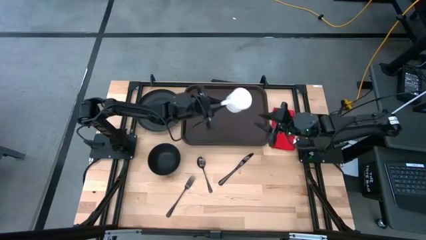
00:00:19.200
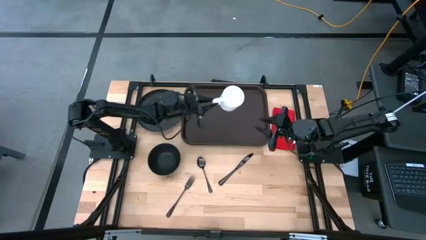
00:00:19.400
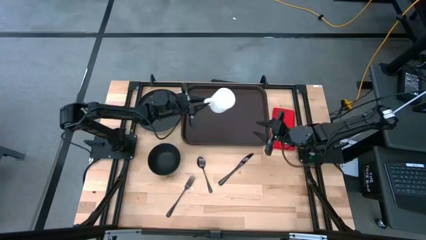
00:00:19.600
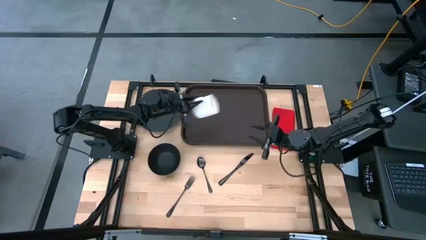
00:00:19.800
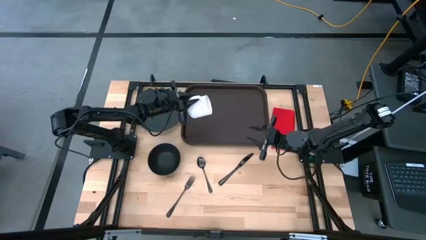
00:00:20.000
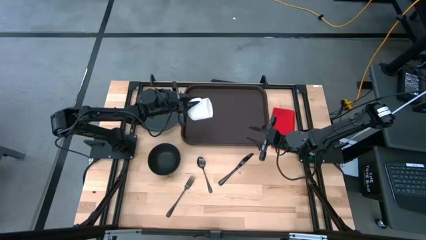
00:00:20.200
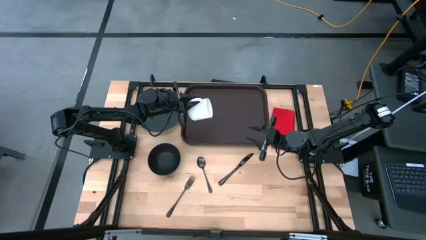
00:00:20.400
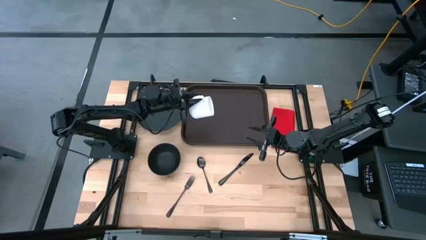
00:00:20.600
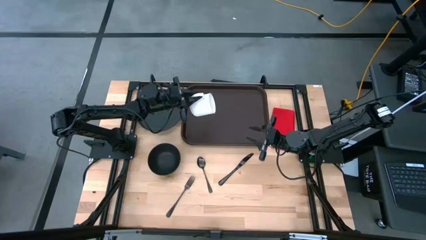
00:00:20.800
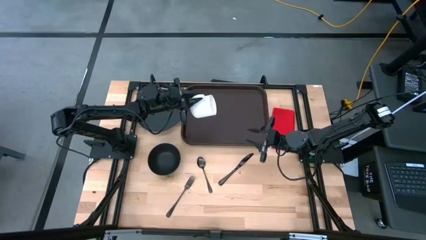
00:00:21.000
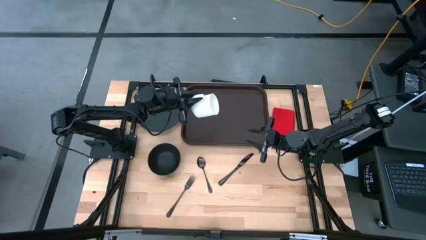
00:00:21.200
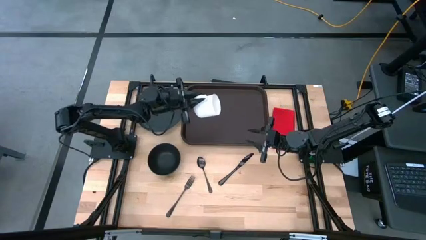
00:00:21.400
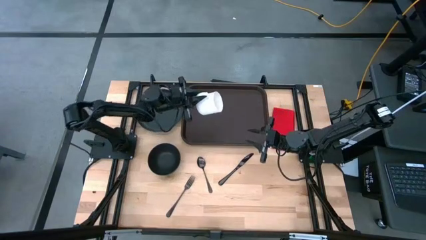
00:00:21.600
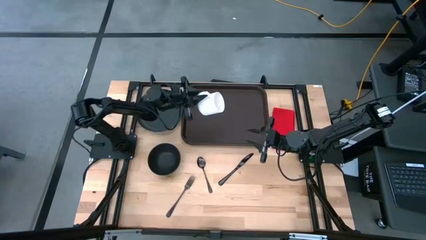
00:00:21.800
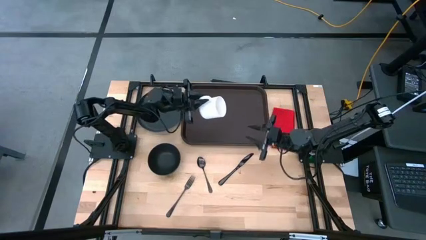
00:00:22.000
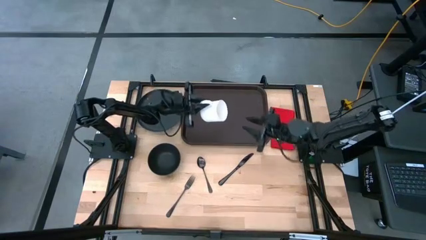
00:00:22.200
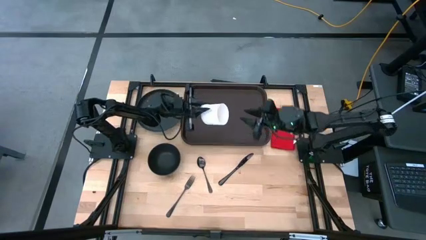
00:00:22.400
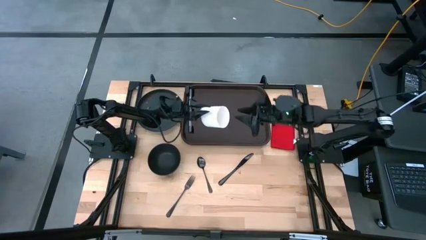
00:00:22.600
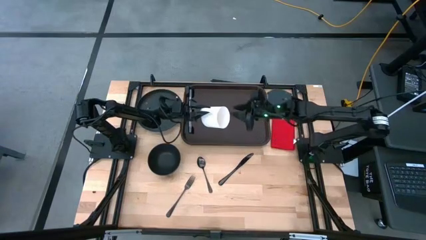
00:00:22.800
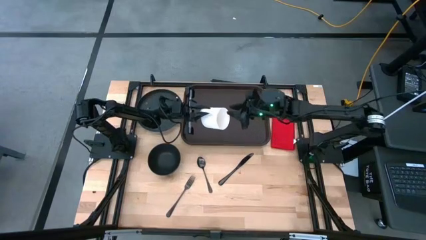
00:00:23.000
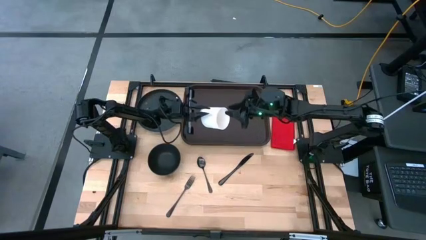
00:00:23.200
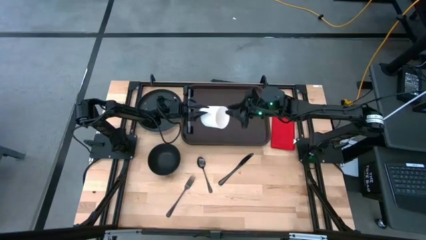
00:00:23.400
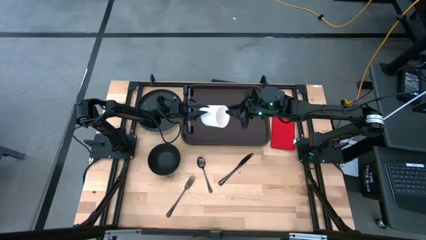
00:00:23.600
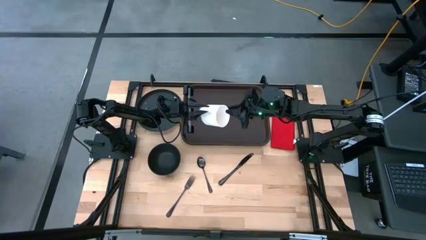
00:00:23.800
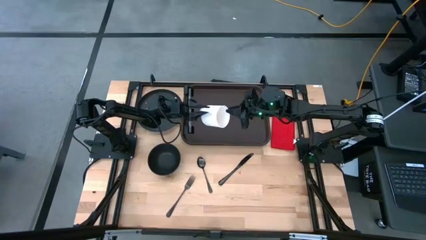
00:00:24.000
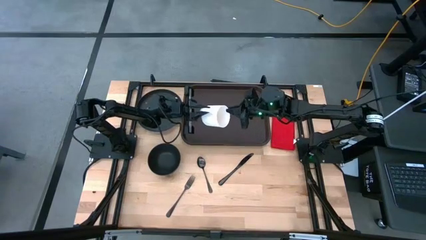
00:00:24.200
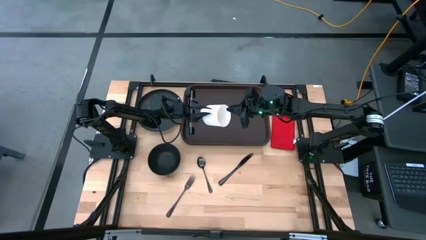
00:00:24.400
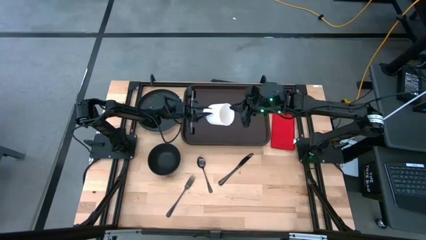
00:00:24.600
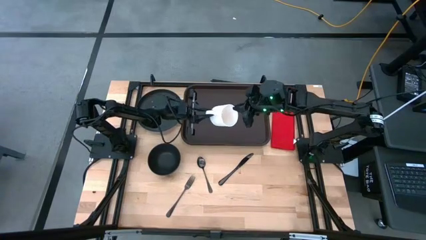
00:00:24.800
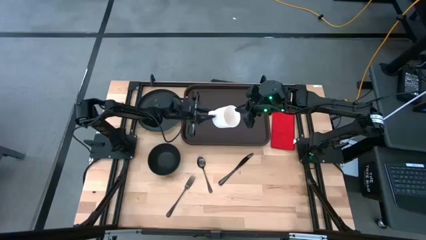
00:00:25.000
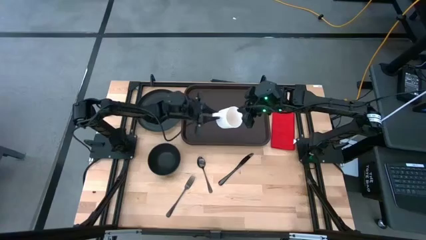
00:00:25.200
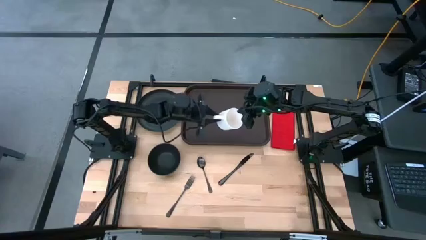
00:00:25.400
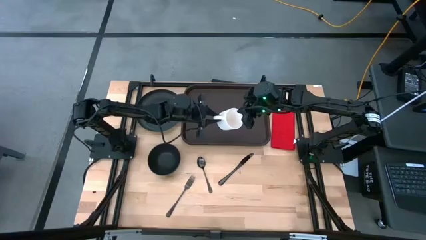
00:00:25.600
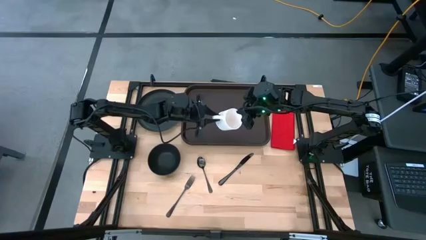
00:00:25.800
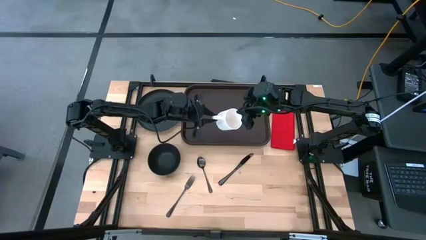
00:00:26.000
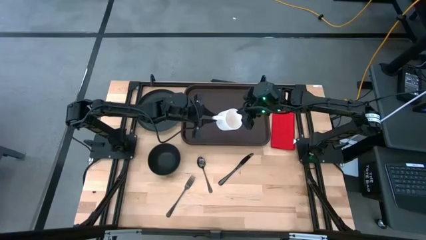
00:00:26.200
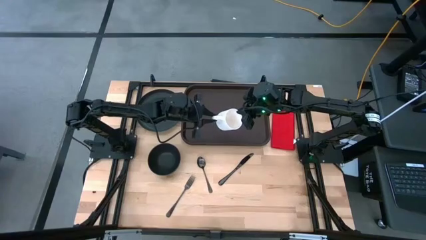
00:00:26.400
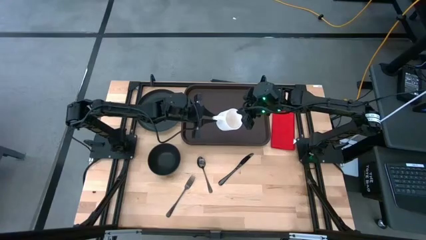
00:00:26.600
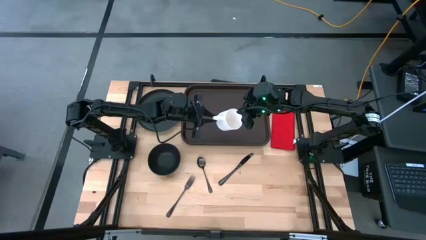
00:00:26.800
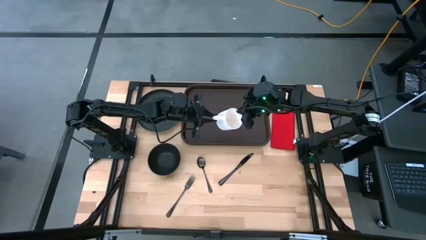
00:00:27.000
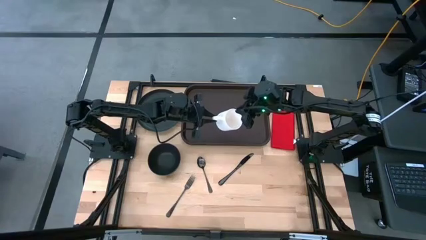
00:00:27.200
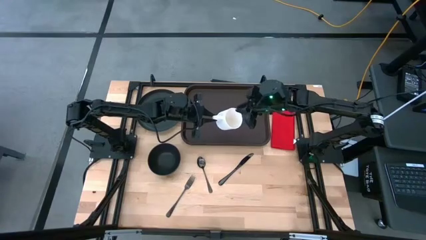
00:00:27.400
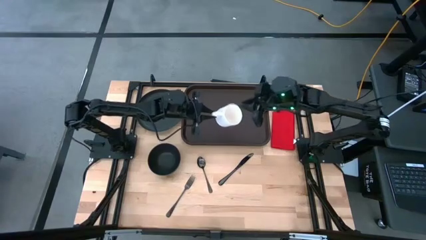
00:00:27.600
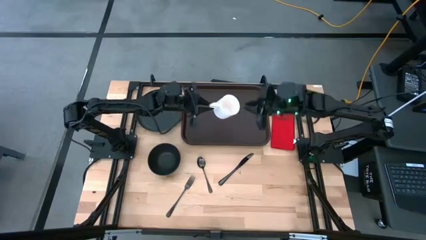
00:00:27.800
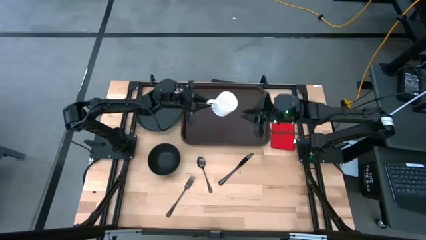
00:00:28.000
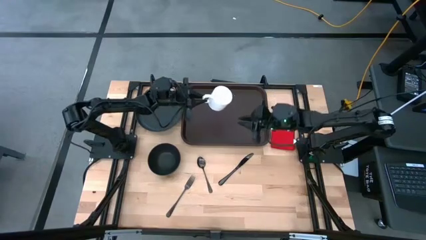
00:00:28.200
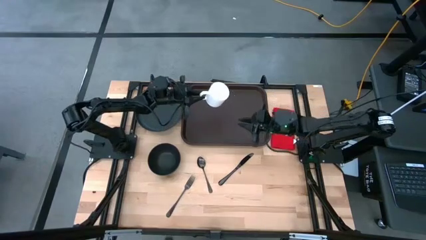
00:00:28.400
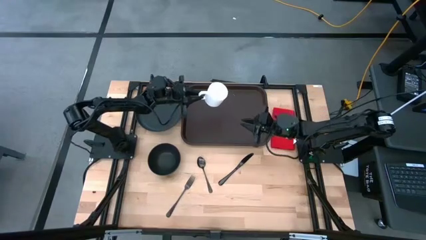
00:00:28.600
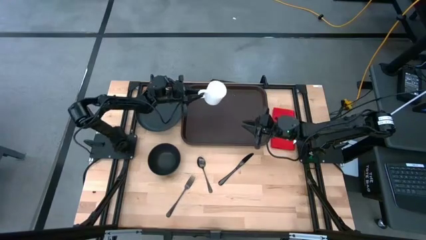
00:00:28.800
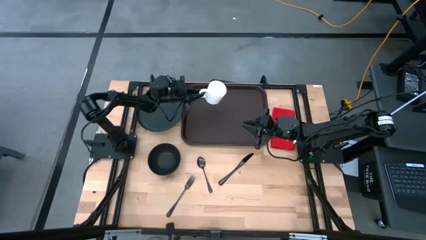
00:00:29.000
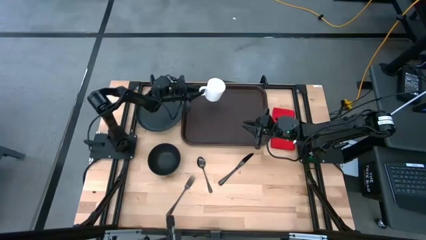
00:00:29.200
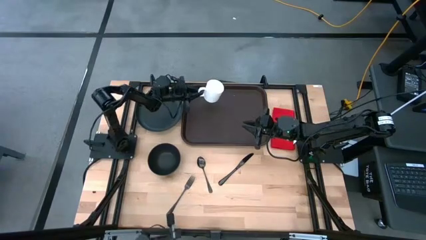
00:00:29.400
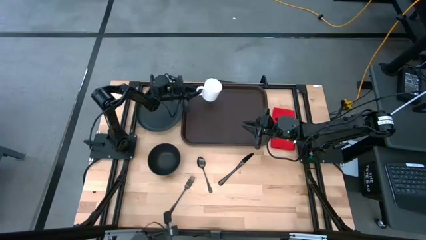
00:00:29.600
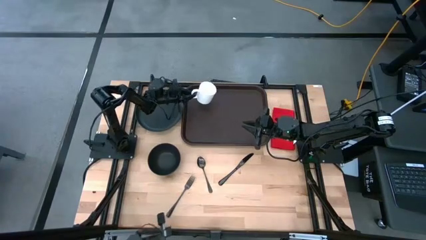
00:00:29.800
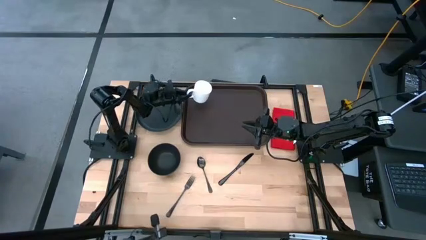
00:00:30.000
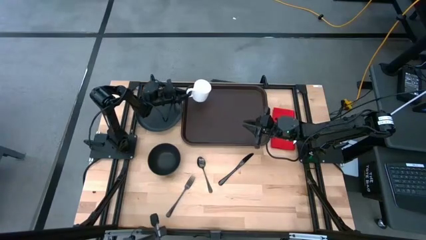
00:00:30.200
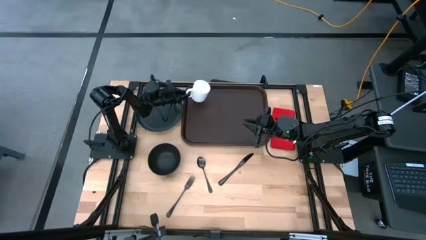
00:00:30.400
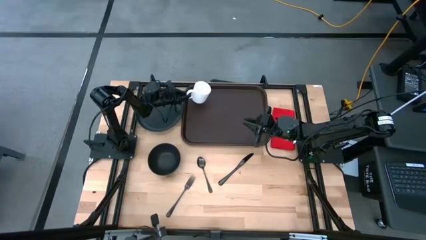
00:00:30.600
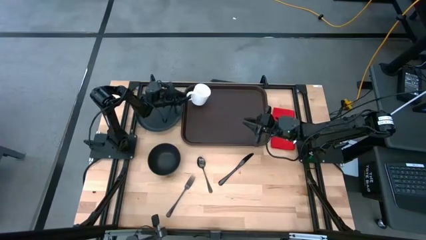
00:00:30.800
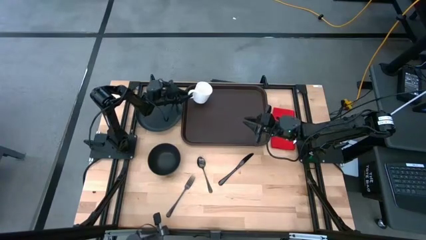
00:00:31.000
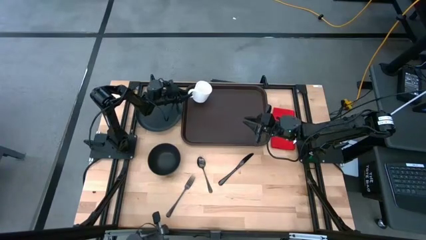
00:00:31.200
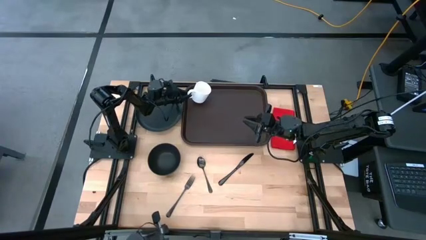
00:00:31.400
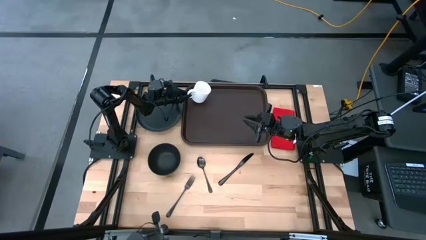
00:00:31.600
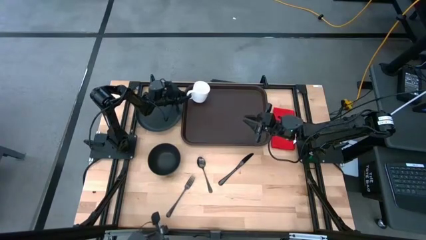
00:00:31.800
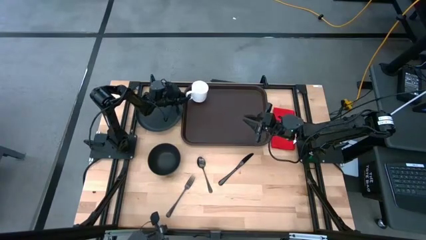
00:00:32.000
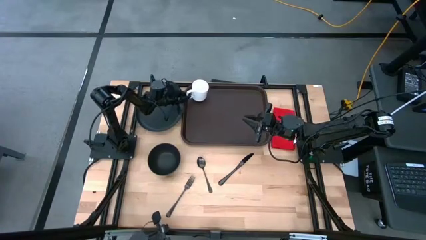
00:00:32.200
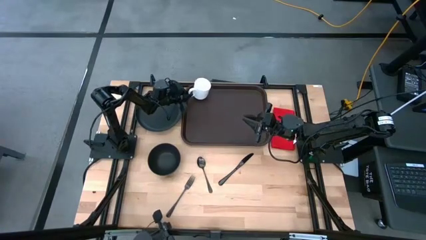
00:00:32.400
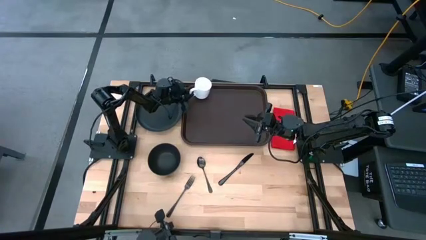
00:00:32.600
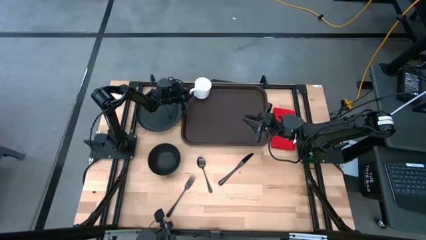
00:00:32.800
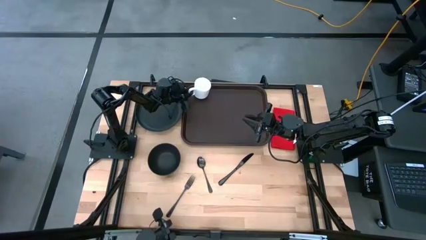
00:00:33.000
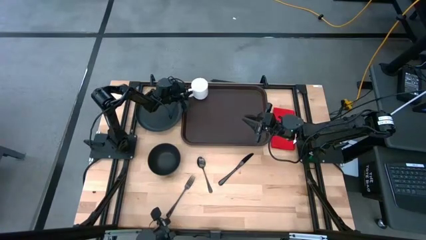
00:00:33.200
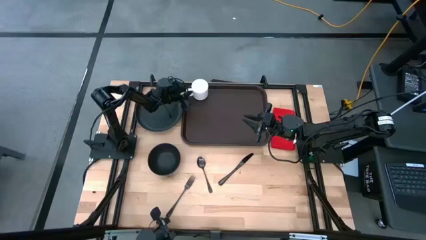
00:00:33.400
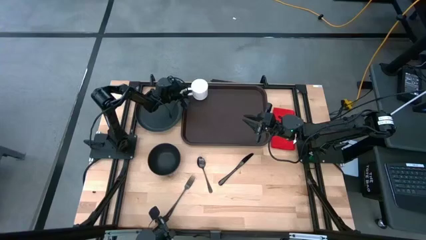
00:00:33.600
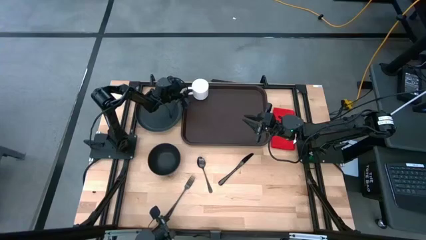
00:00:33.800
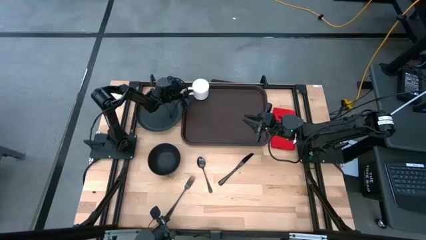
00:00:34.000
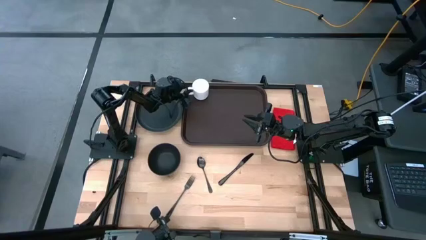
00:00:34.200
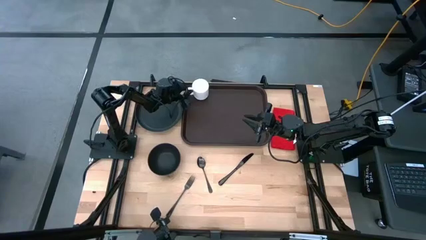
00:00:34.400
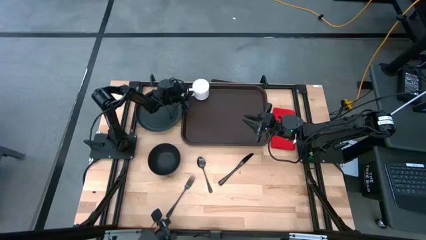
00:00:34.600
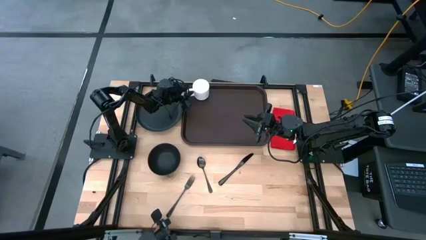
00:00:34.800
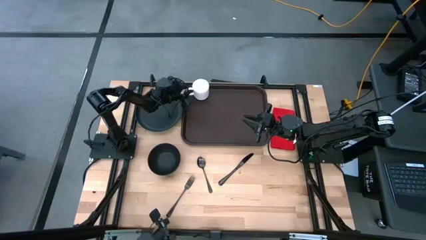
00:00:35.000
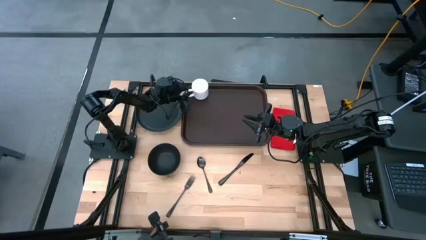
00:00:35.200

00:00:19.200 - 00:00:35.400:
Task: Set up tray
Put the white mug on the top left of the brown tray
